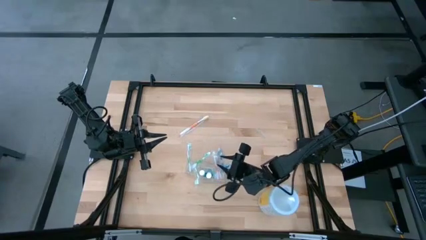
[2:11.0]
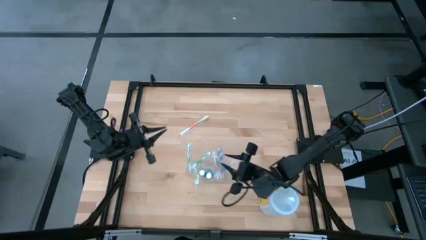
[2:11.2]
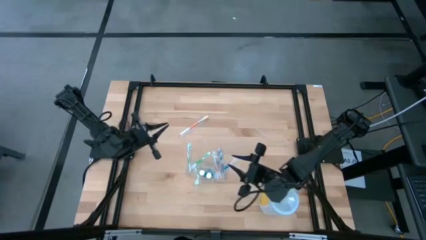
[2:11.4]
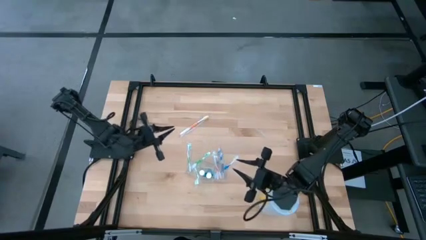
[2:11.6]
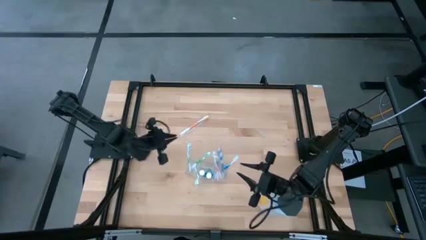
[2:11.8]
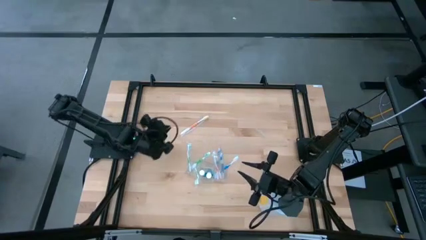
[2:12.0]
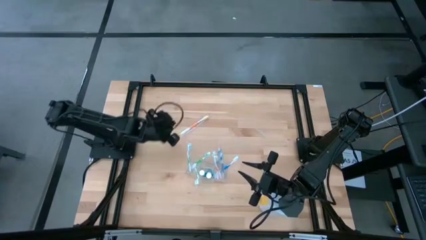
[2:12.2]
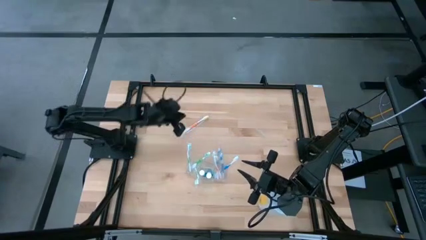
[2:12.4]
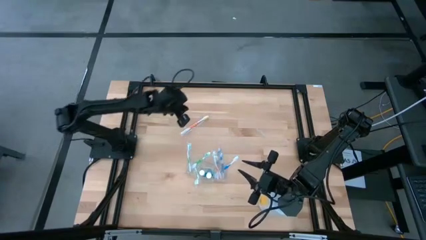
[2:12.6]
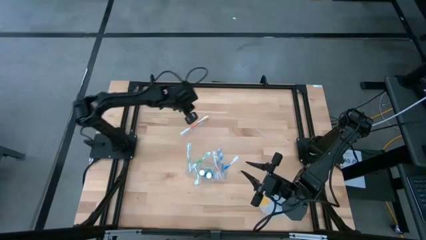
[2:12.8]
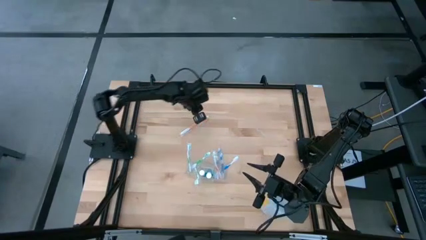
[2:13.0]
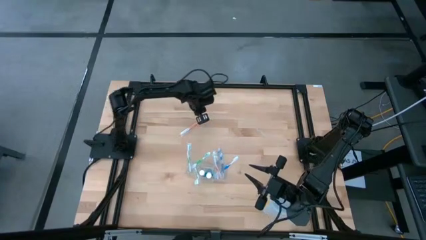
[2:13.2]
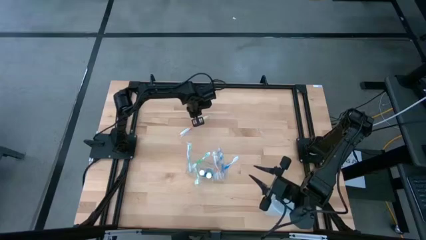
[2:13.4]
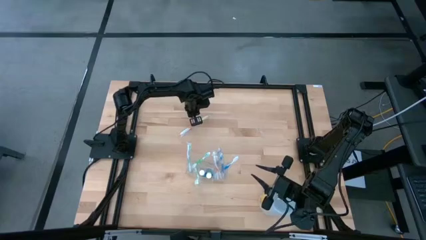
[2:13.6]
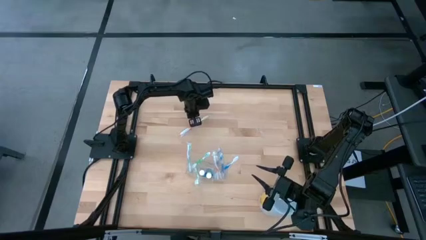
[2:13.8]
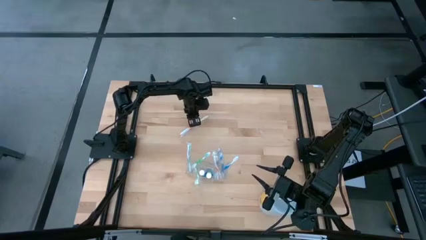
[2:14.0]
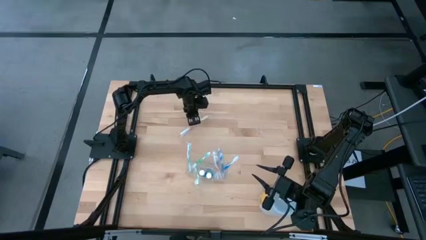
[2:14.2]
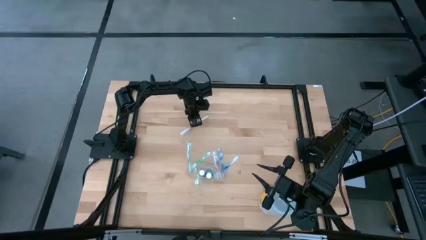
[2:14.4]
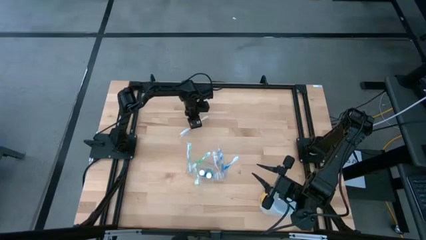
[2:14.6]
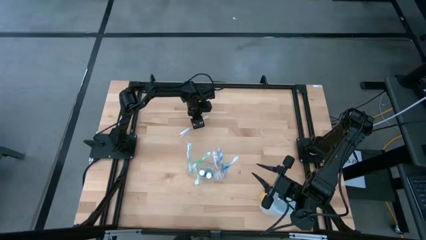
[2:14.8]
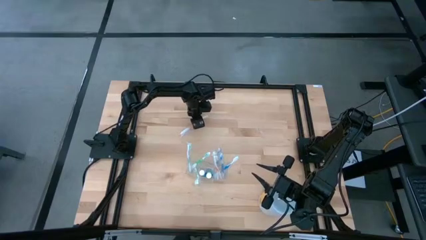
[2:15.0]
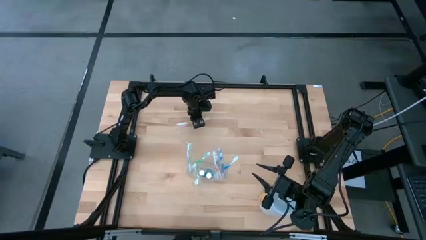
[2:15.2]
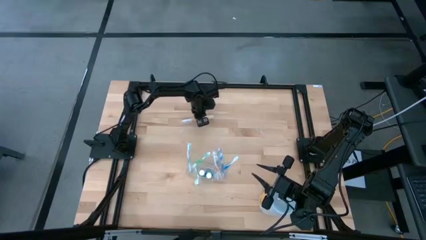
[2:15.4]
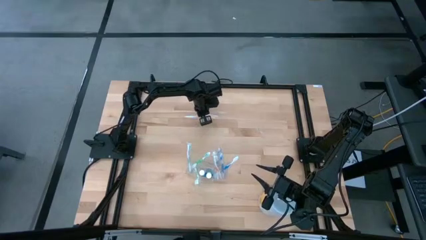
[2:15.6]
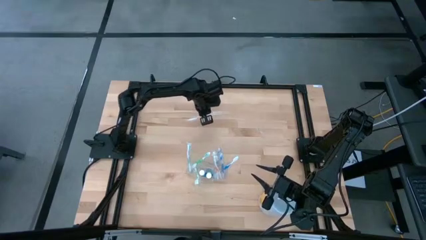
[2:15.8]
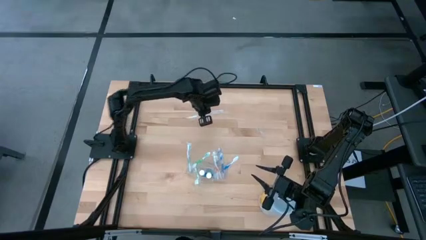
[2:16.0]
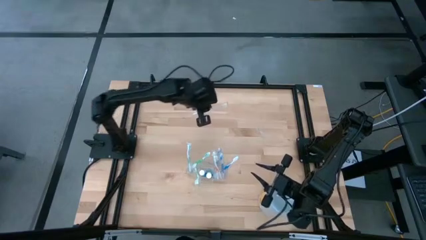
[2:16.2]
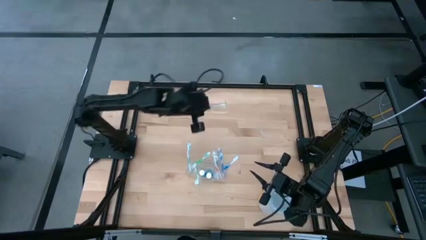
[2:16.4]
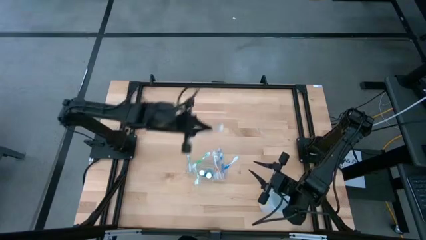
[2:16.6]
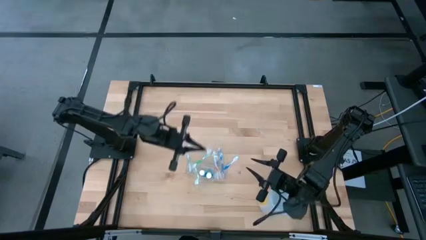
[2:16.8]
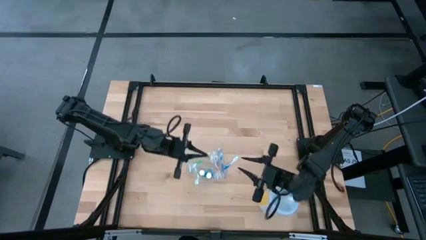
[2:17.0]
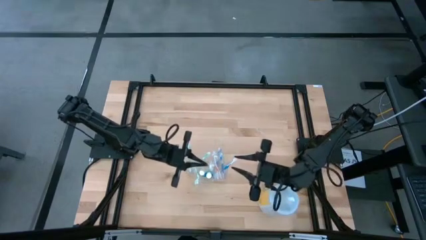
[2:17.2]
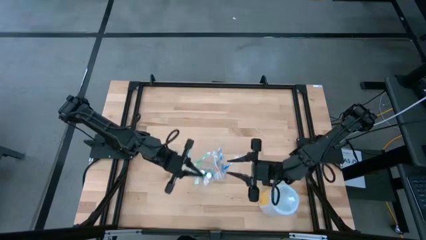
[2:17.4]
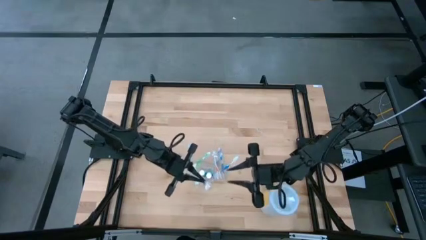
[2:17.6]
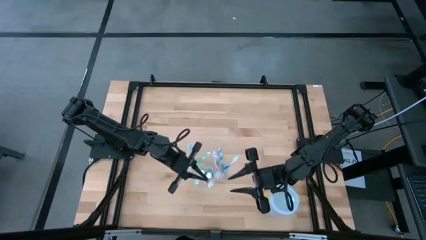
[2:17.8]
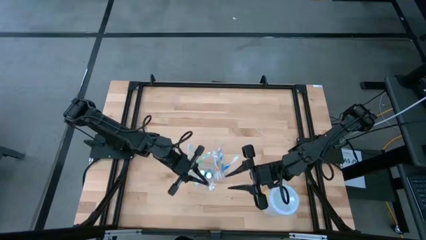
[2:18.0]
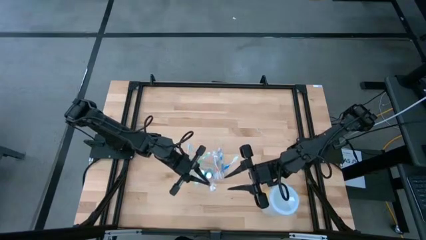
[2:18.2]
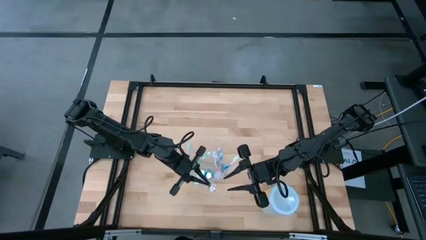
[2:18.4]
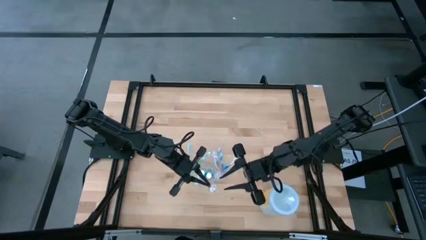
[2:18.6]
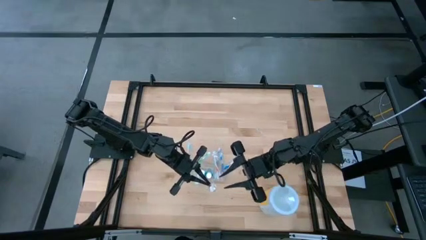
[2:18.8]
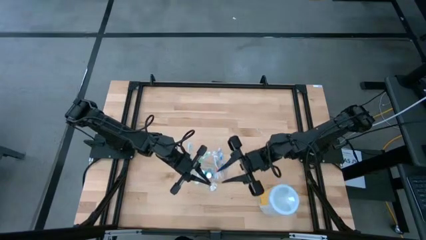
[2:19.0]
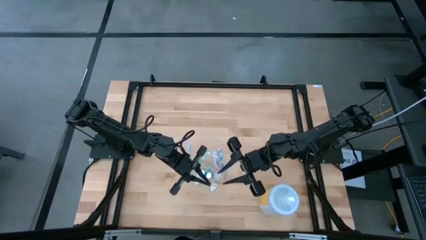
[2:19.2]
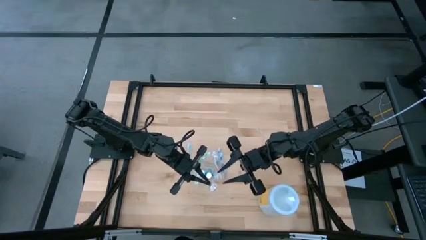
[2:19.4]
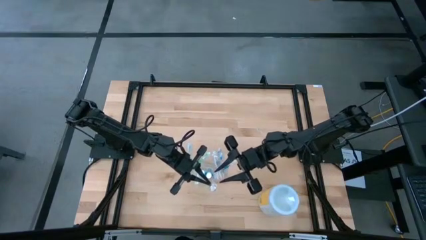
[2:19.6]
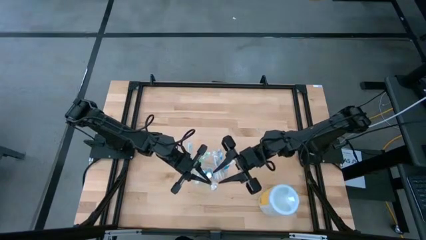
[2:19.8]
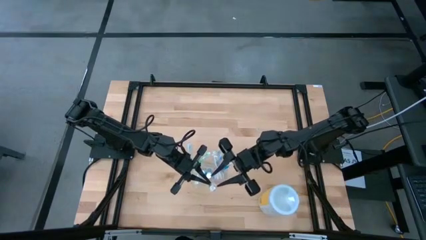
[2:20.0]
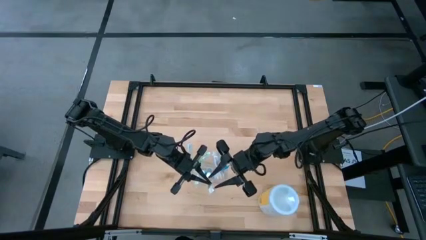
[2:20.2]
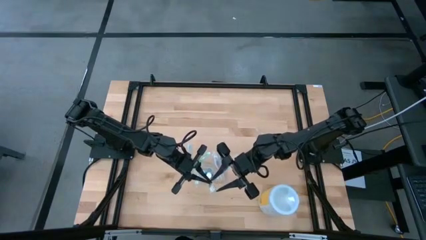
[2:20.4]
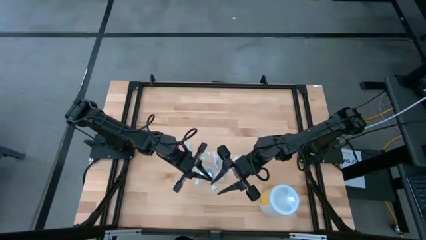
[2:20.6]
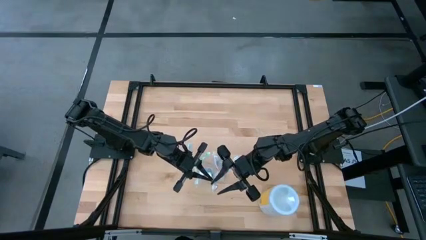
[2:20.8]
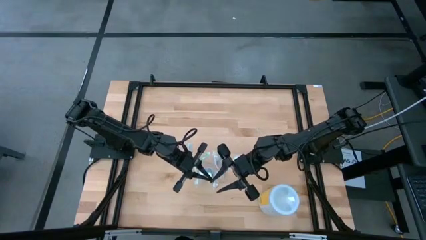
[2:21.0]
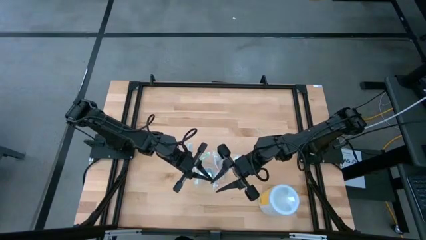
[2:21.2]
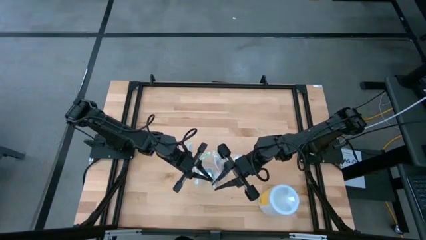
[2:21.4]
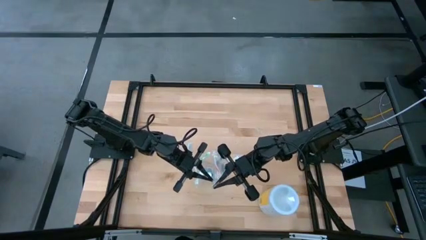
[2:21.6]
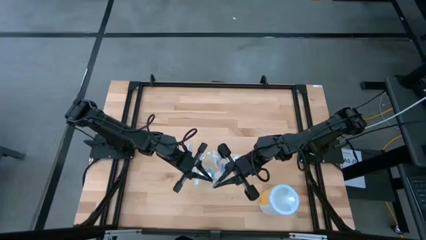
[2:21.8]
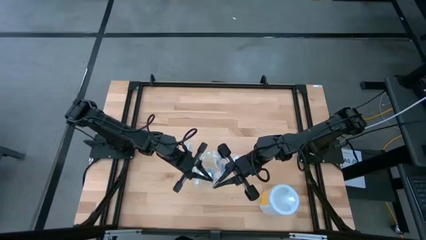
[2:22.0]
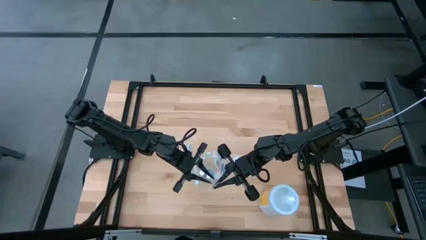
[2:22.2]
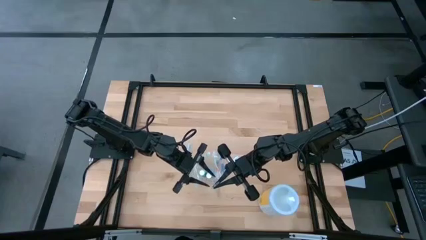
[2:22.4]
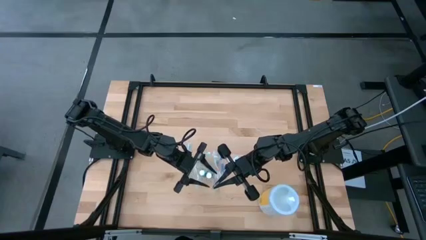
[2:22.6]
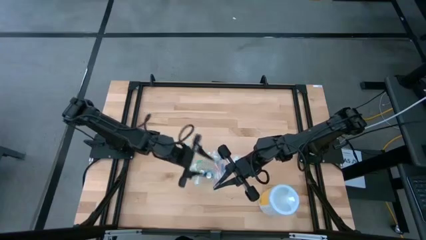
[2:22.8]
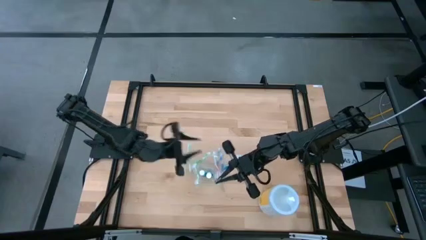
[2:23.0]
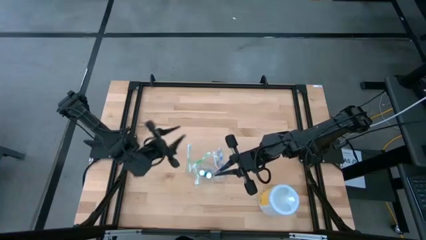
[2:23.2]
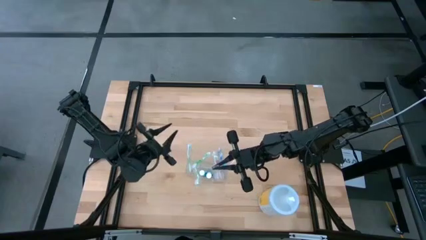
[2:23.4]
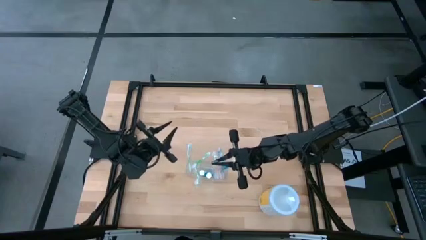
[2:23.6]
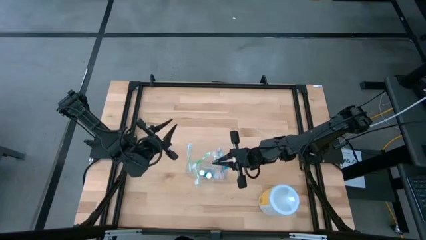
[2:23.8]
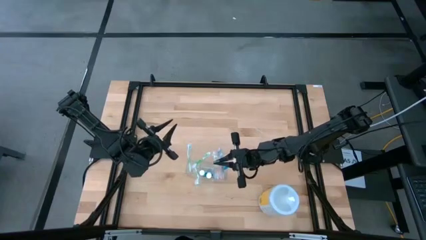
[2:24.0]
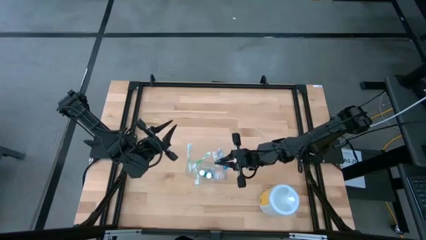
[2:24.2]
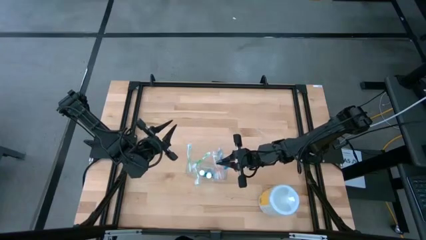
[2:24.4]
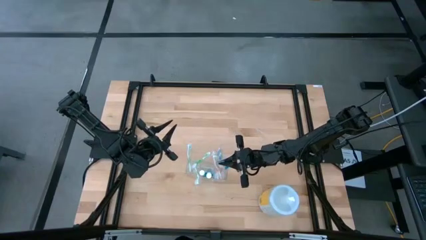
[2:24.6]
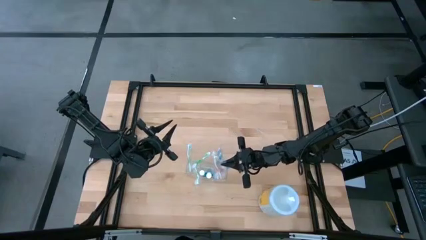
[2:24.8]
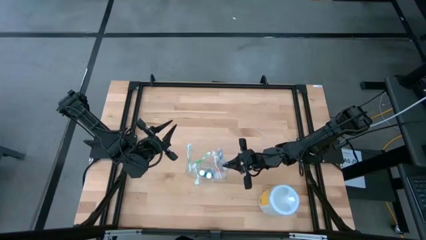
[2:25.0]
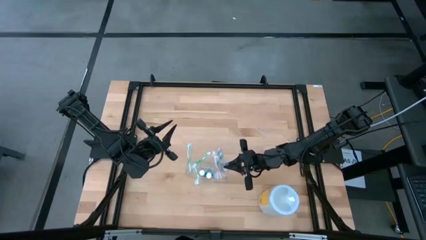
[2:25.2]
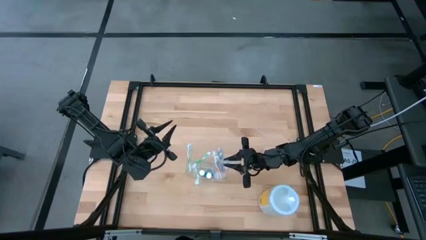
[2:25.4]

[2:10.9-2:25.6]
Task: Pick & Place toothbrushing station
Put the orange toothbrush into the transparent organizer

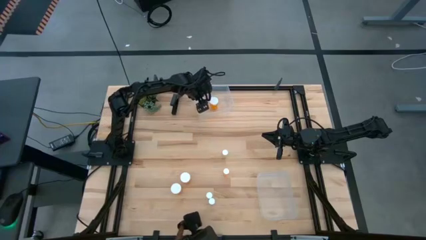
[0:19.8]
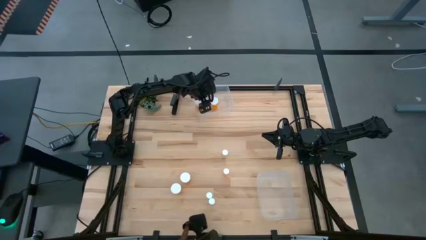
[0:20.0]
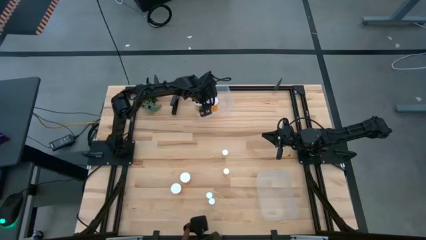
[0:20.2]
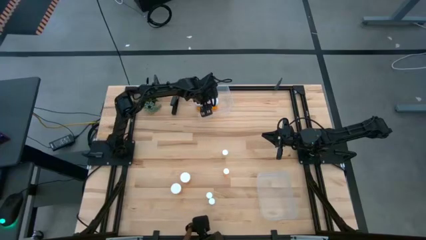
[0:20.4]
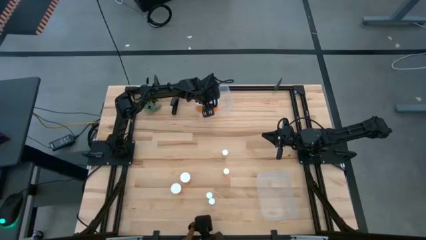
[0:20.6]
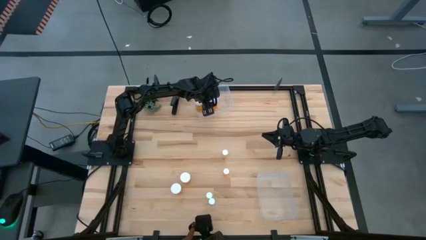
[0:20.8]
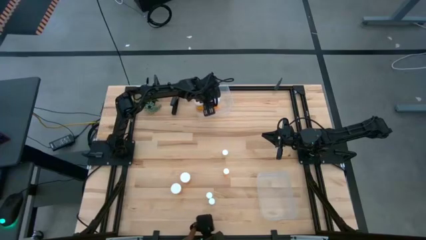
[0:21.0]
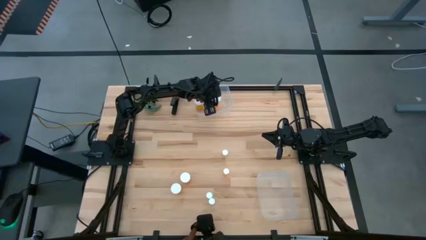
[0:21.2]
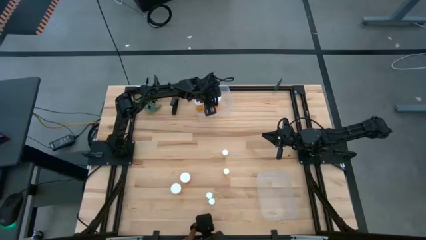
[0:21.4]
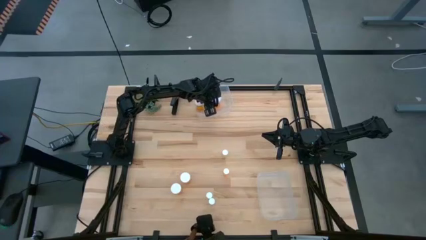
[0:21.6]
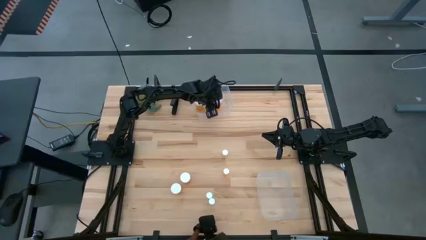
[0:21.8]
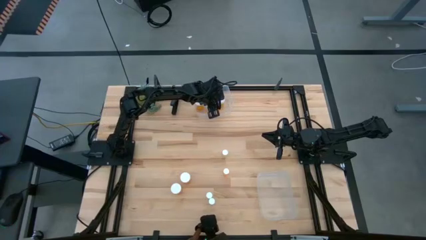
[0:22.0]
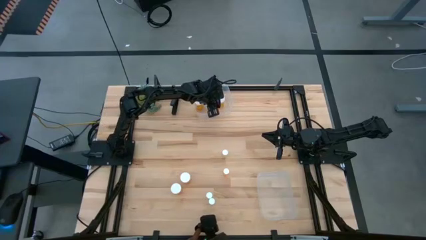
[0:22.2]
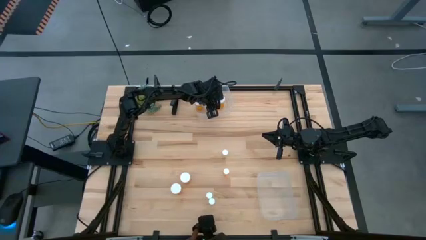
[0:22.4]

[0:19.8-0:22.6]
Task: Pick and place medicine bottles into bin by pill shape (circle, oval)
Adjust the big orange pill bottle in the transparent bin
